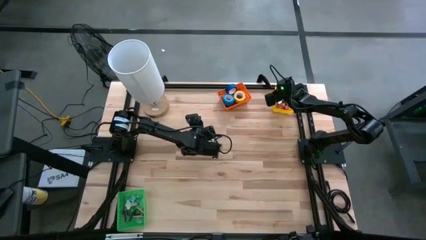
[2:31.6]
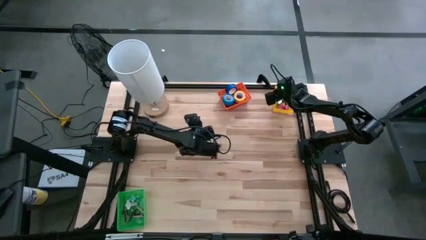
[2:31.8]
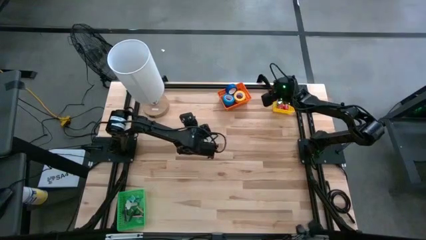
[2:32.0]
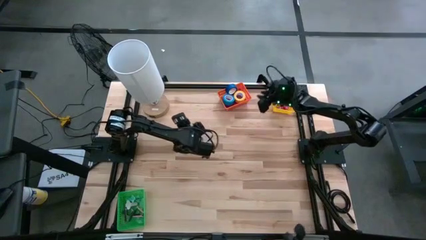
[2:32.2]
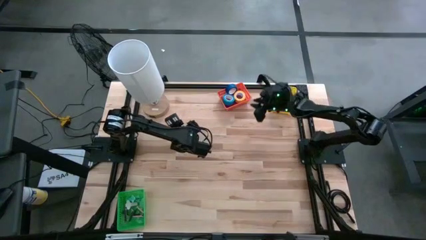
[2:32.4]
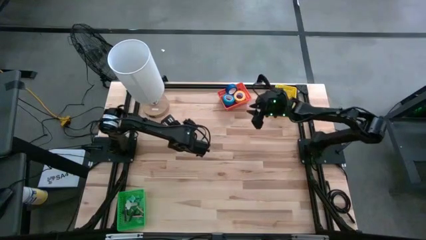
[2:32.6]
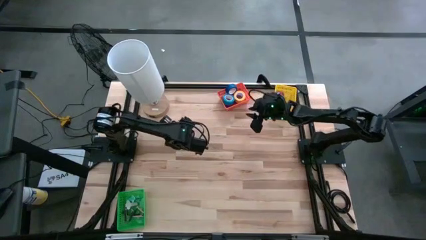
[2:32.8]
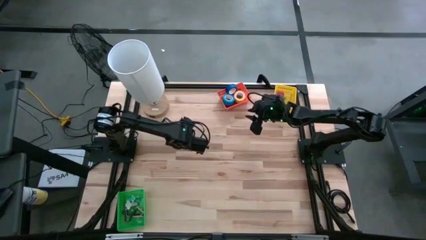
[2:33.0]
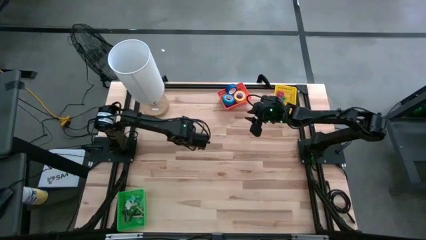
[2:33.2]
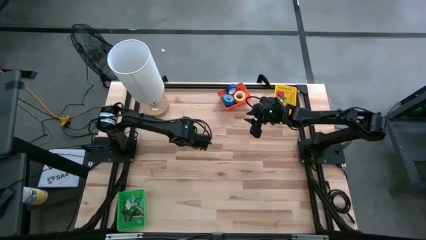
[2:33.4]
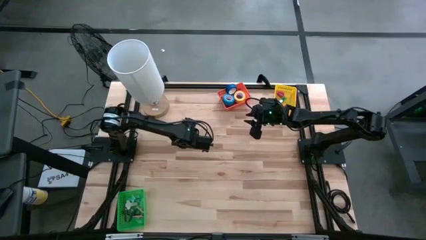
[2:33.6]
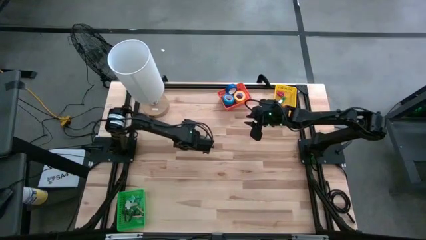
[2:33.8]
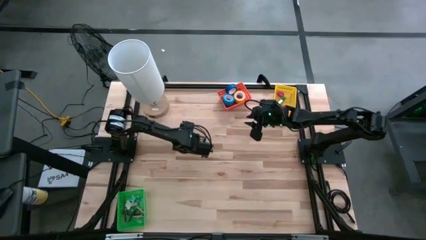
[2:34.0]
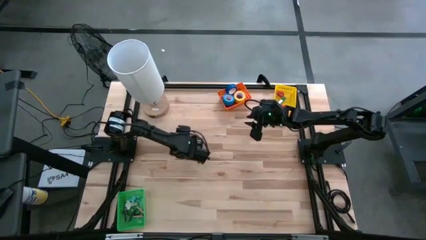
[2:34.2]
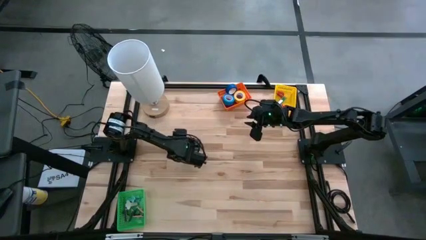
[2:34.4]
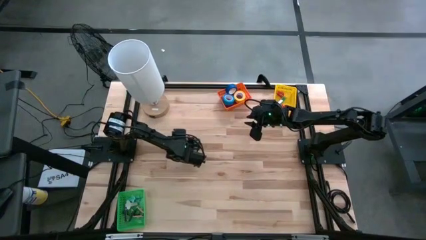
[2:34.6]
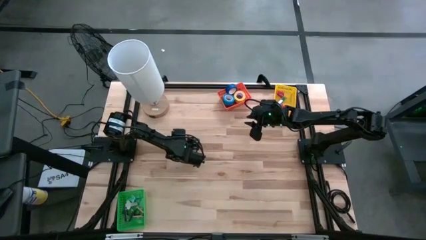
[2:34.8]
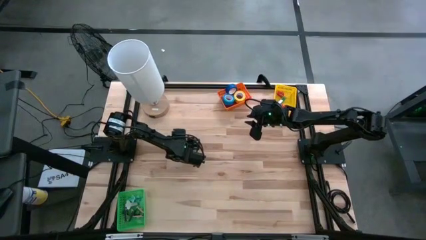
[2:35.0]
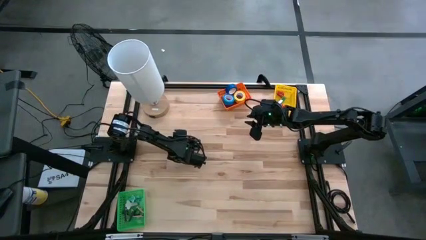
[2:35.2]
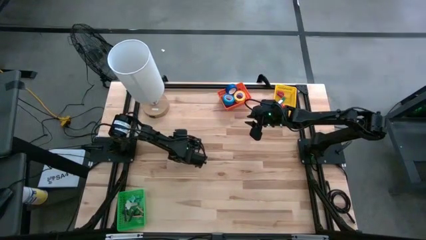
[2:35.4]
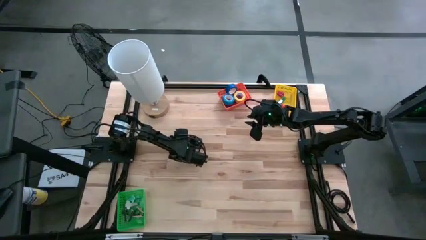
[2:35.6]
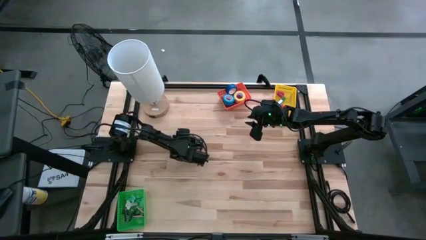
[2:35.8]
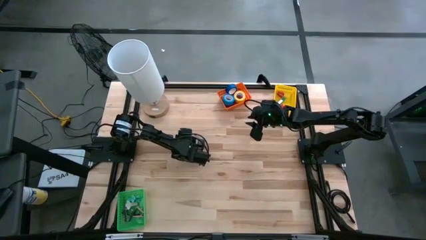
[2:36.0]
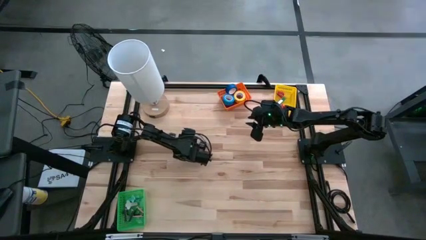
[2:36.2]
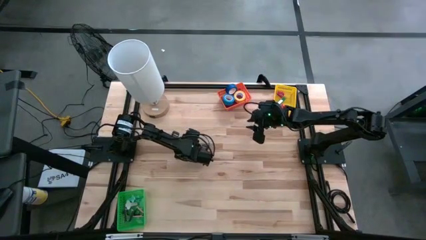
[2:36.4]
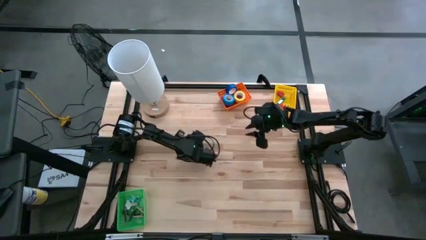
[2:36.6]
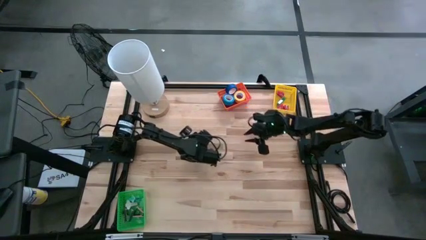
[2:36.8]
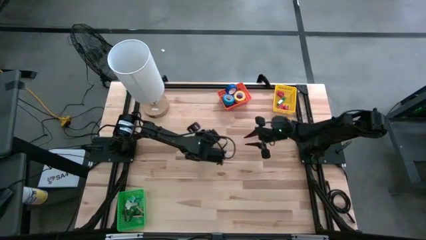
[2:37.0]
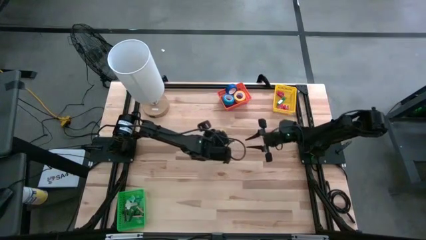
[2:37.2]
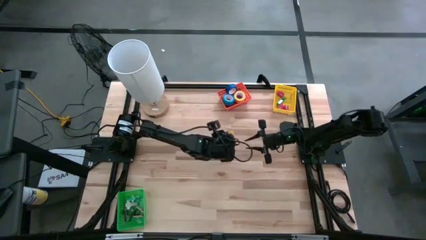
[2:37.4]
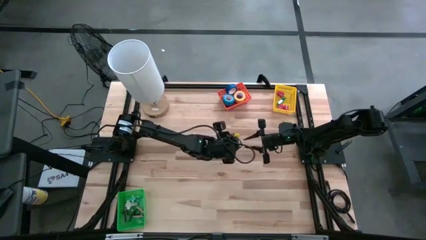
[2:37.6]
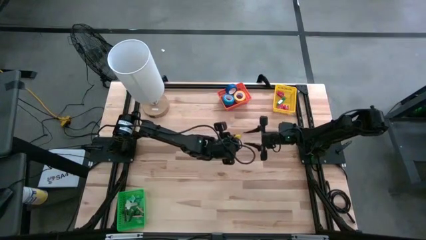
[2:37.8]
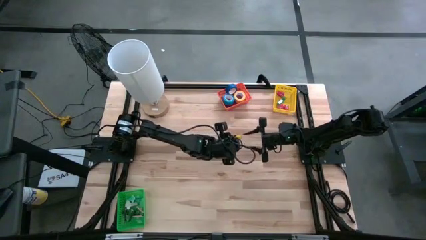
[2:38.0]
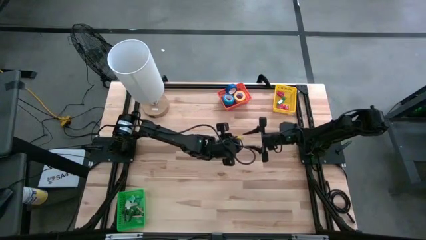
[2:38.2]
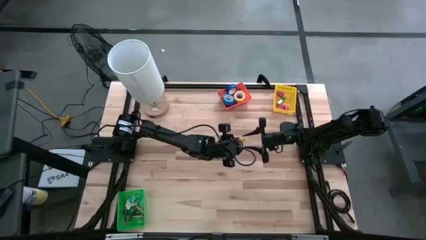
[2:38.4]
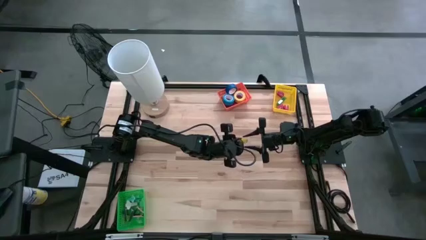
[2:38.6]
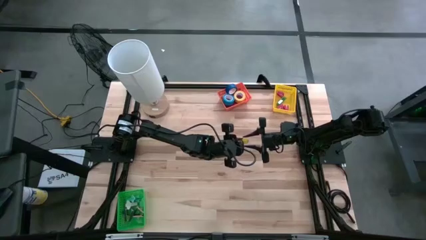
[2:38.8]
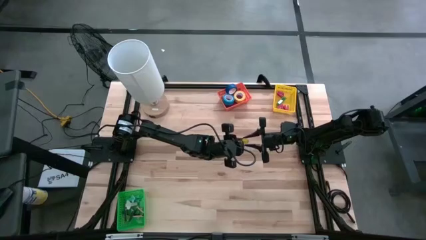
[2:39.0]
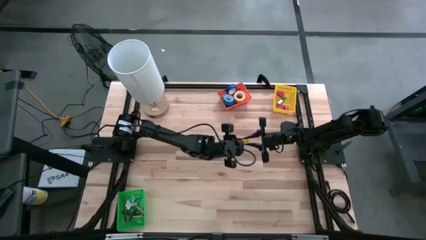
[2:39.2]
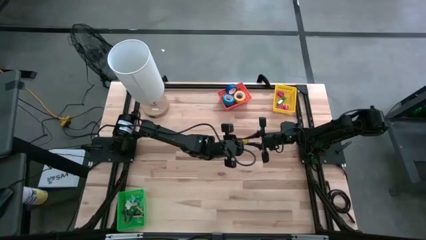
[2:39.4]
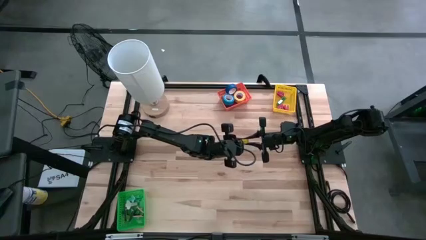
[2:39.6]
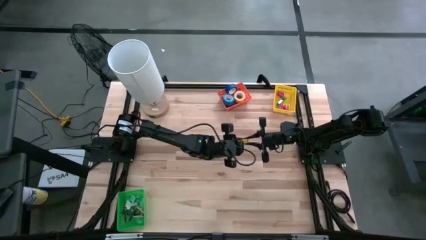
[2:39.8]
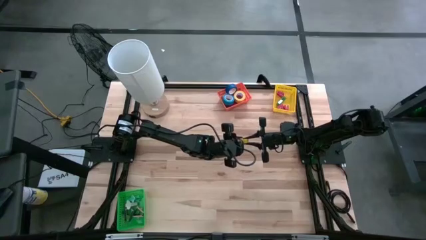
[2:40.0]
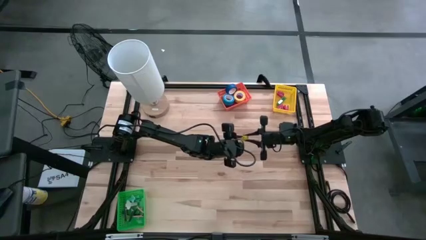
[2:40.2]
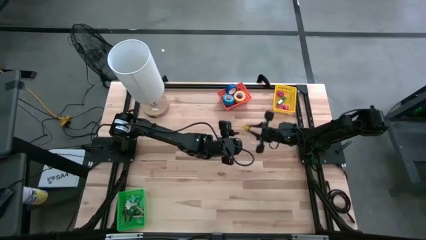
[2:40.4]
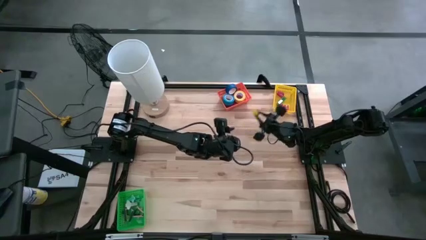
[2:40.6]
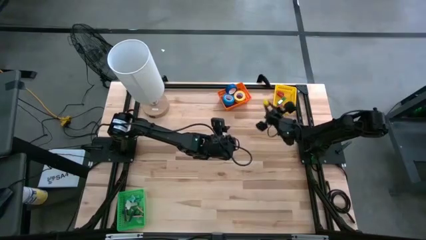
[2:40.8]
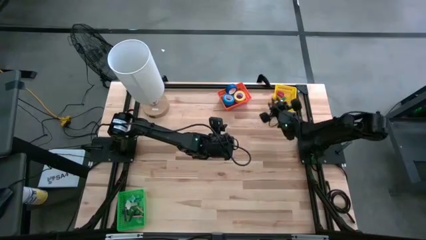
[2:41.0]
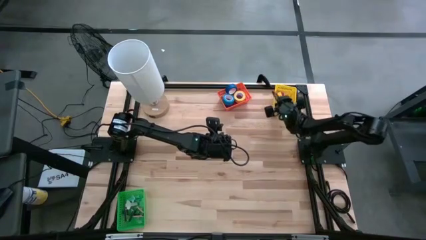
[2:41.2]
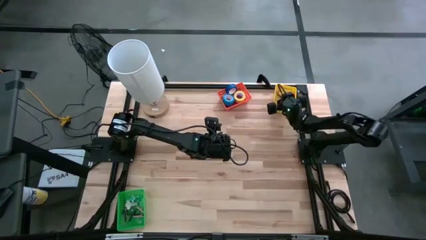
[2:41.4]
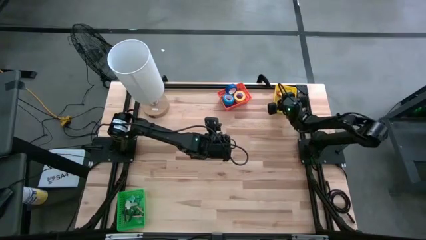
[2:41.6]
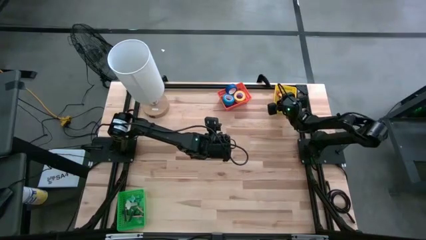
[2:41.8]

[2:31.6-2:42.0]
Task: Pick and place Stapler, Stapler remover, tape
Put the mini yellow stapler into the yellow bin

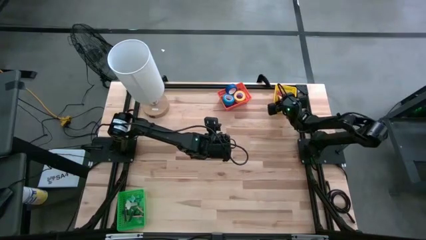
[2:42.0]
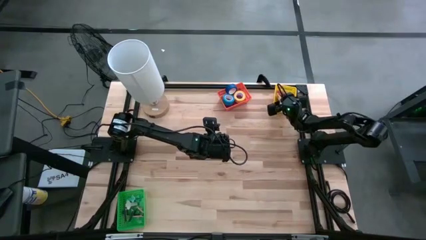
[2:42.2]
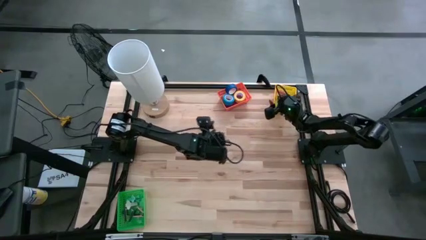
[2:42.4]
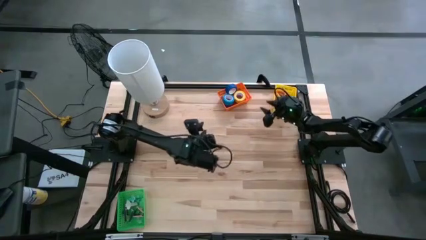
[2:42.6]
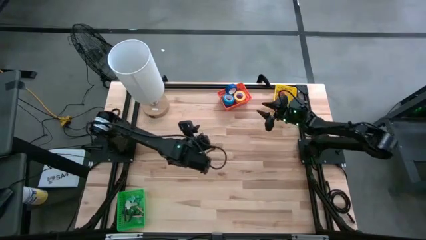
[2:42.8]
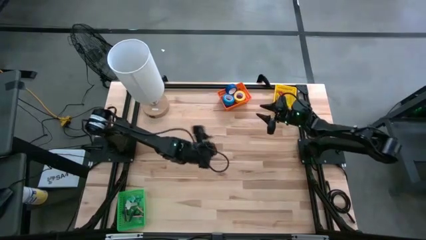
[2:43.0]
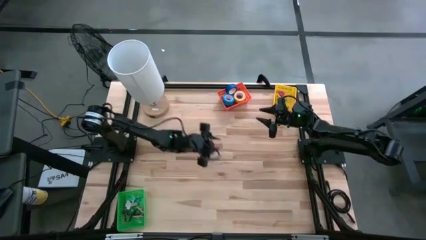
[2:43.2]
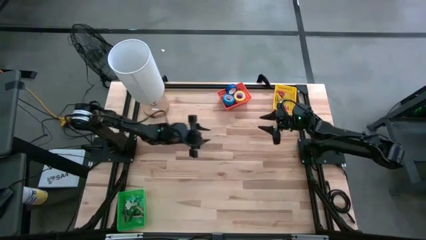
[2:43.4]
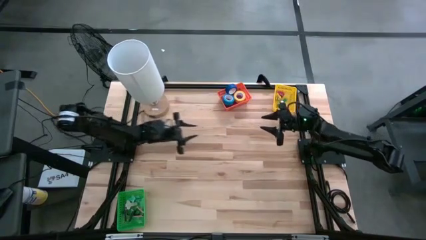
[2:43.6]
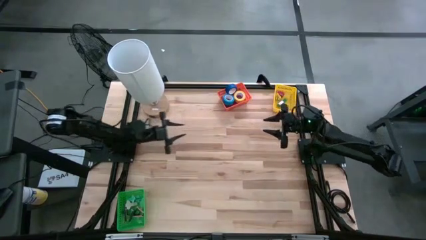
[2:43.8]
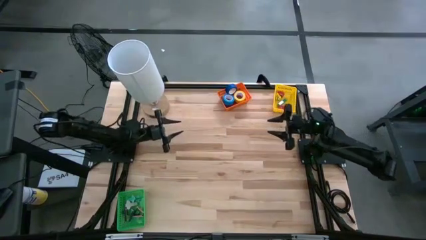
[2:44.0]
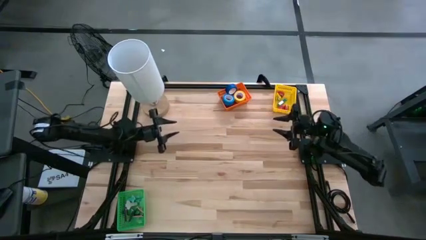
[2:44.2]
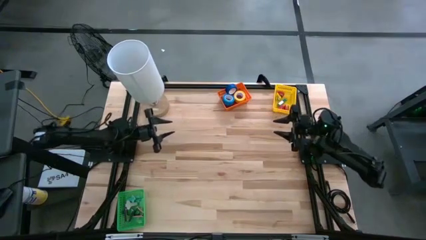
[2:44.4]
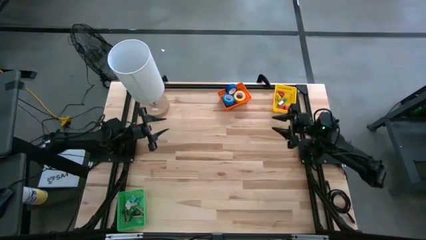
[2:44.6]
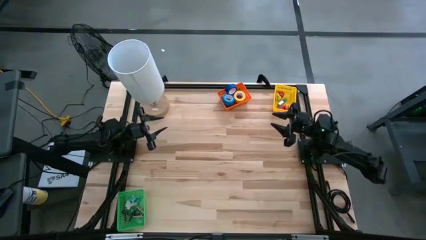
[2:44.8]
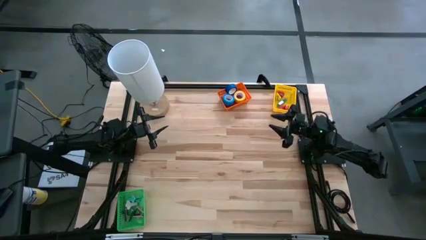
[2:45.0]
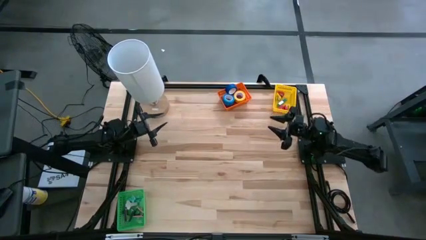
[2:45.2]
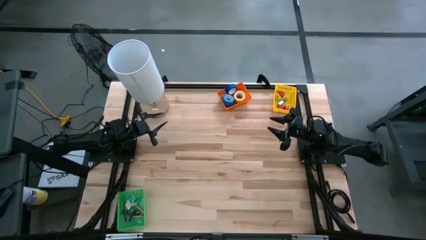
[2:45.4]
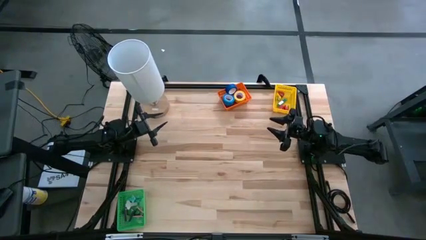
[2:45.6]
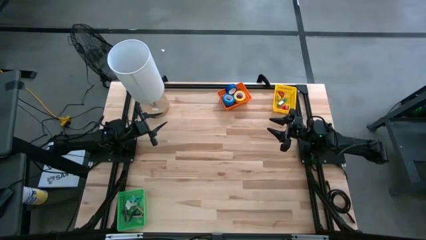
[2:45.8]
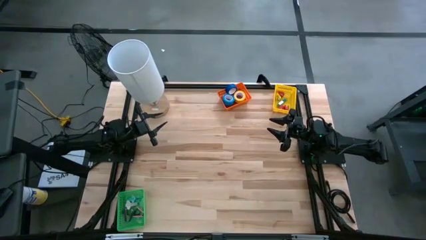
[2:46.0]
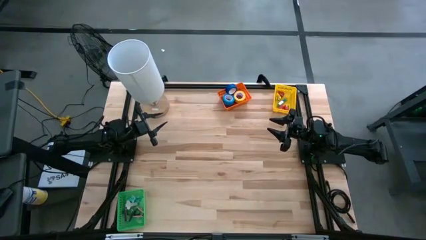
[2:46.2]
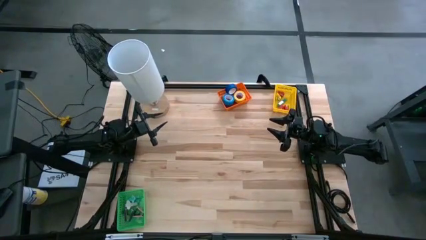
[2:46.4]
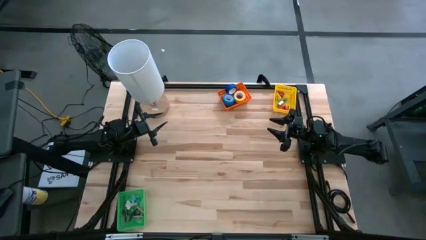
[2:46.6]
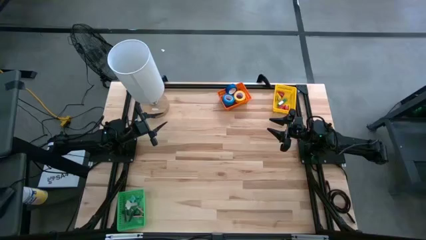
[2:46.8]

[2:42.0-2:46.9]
Return to Home Position
